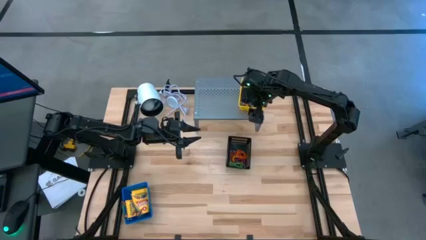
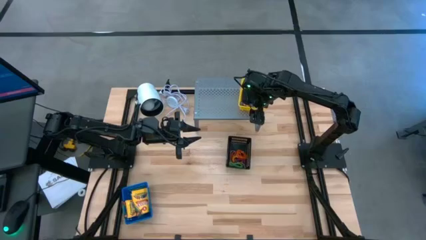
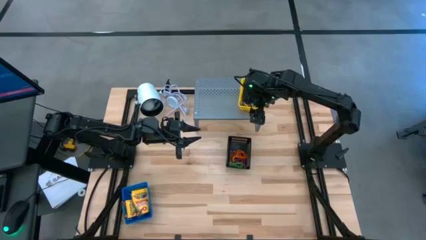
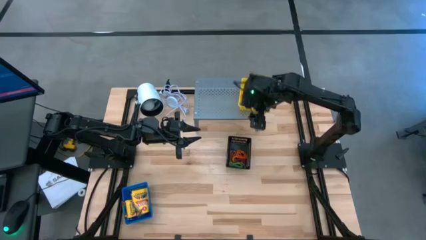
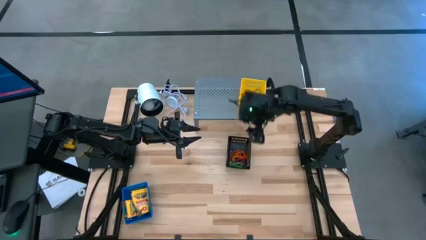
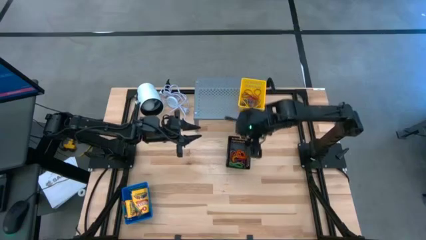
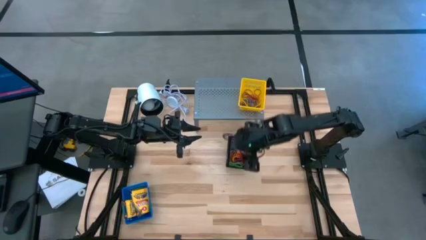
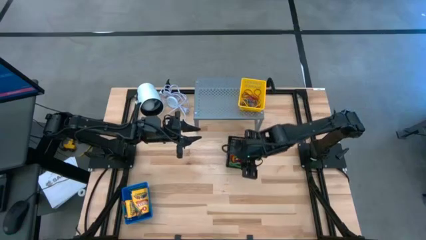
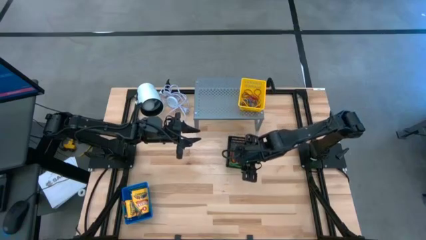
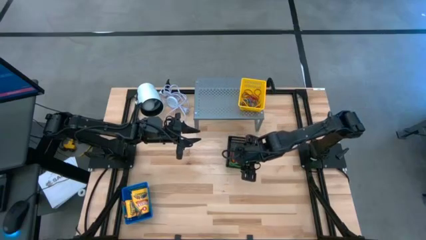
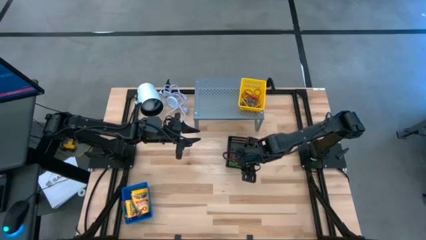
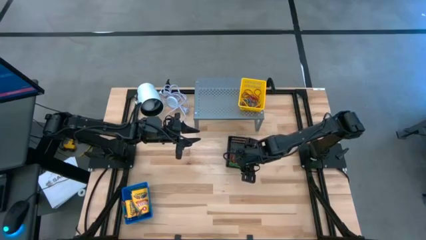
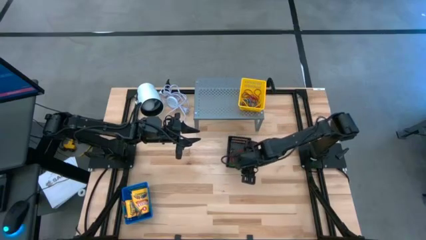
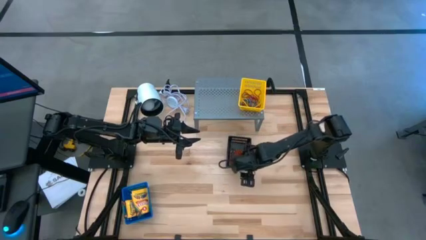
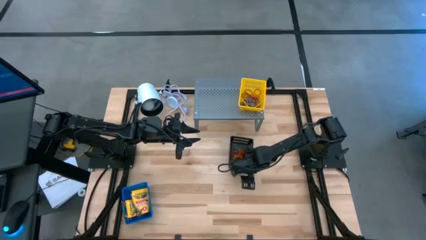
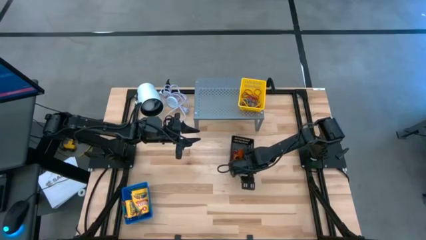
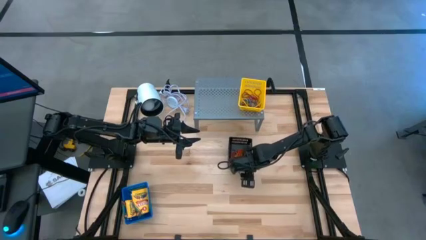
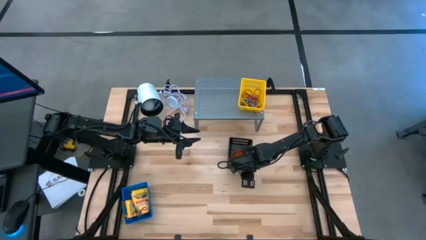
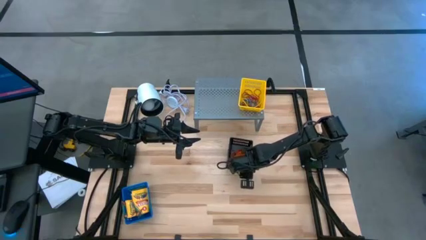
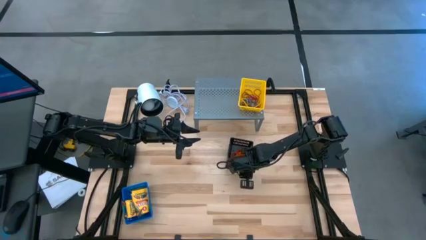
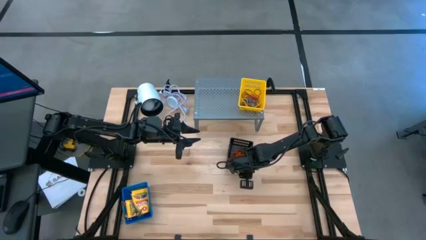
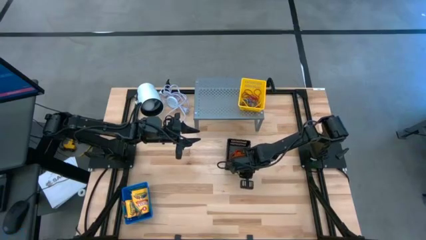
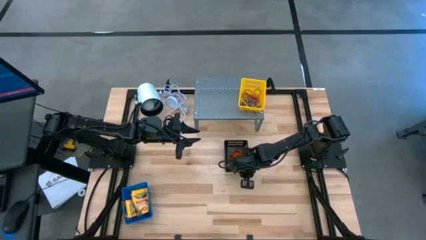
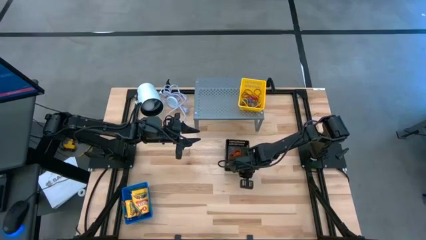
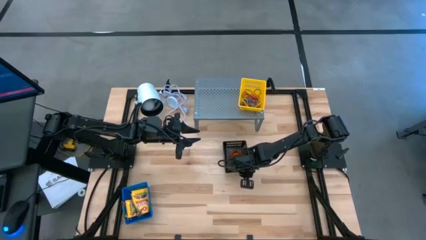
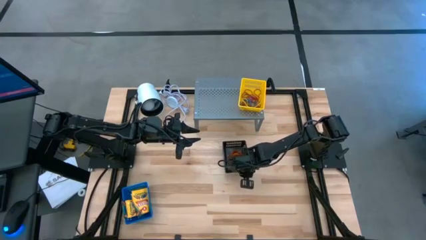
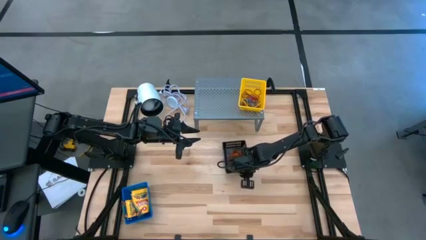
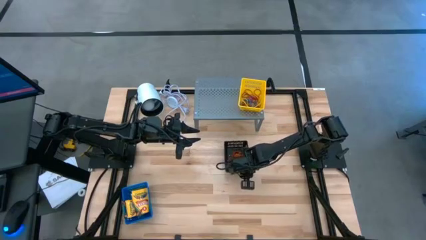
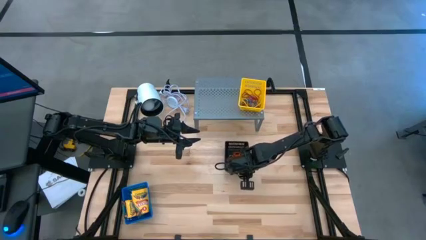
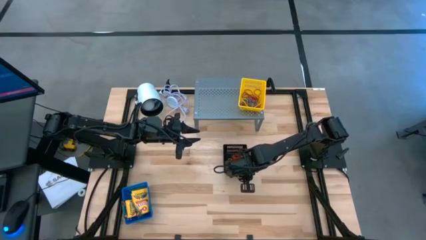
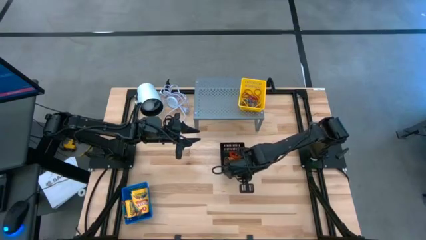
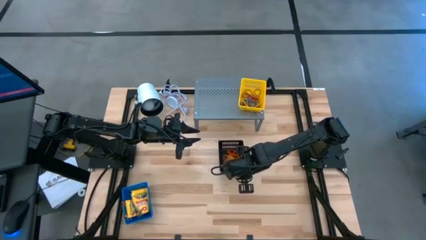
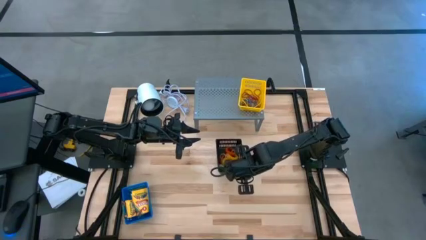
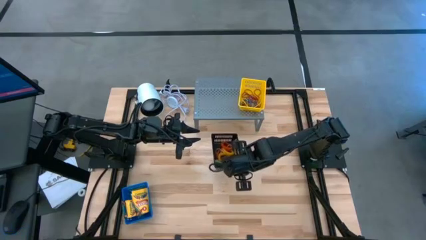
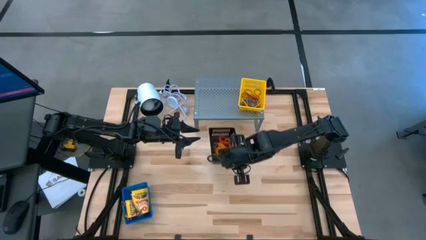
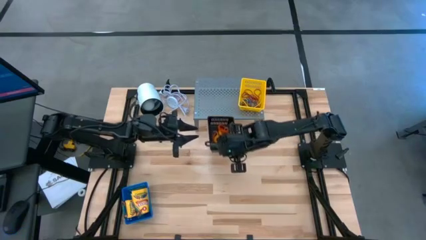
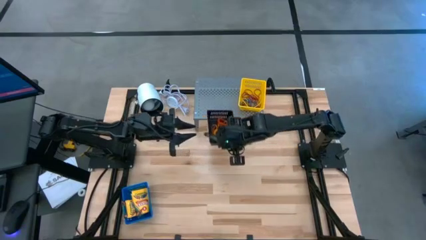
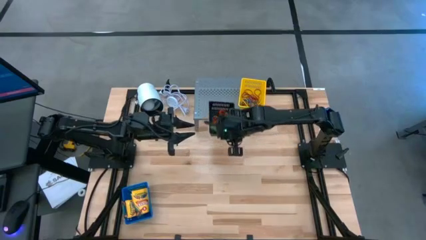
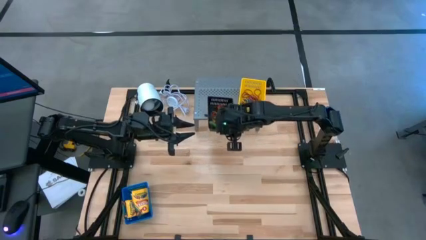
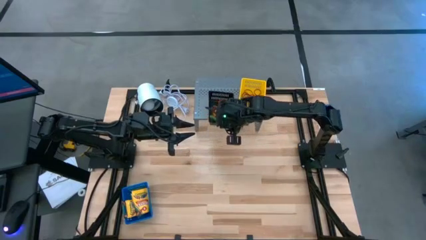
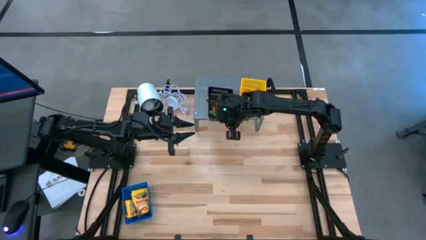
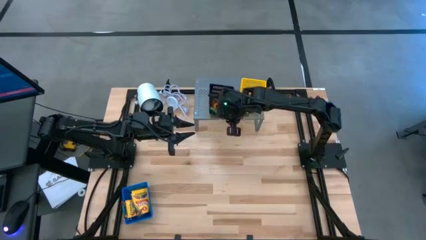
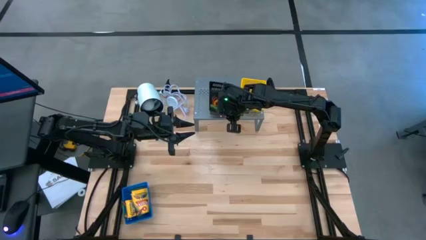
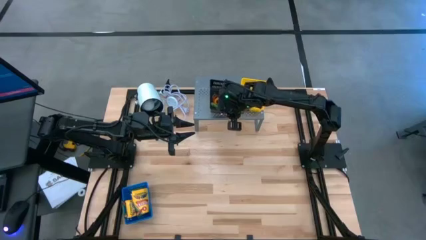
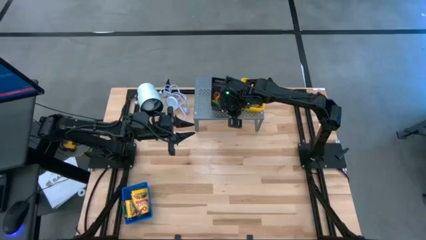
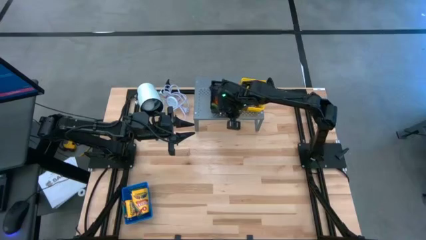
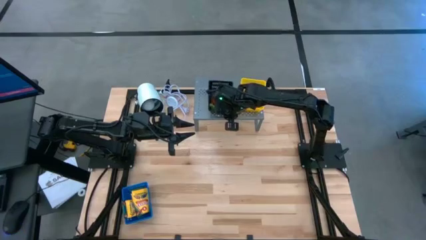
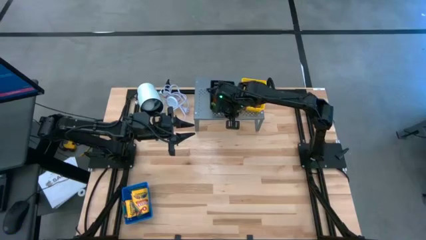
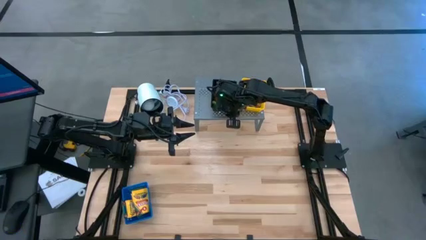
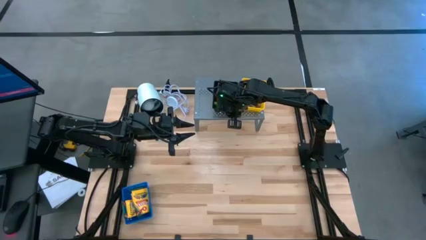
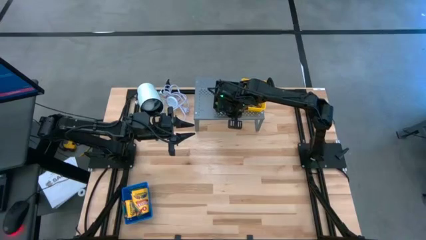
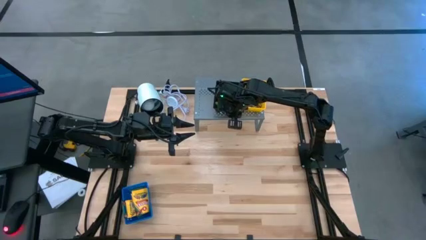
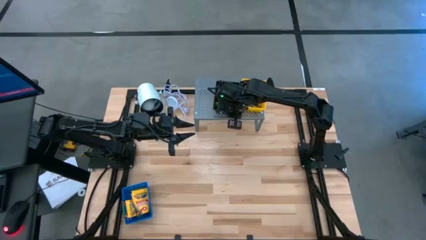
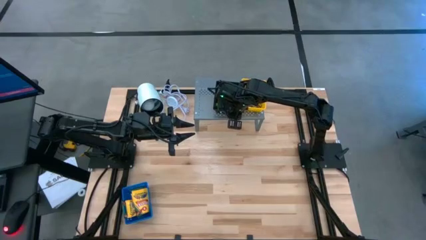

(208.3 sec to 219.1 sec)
Task: Pick & Place Office Desk Supplies
Put the black basket filled with spring rubber band on the shelf

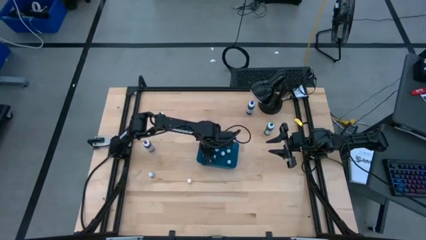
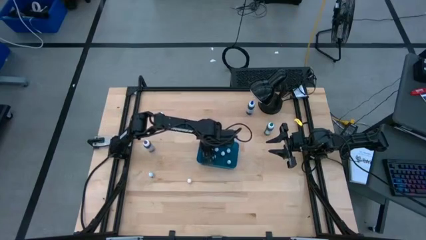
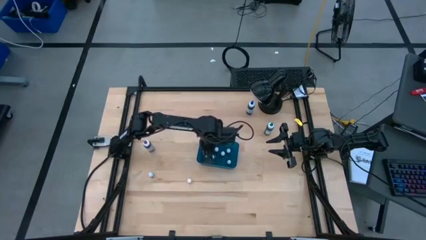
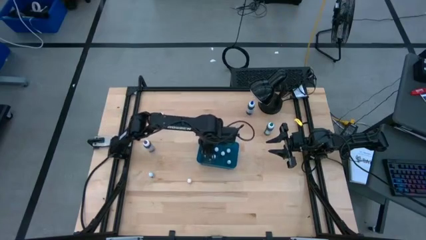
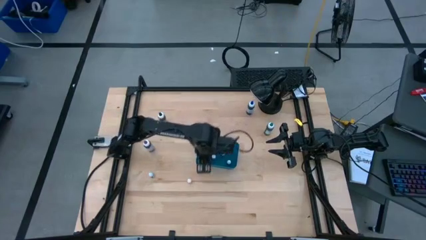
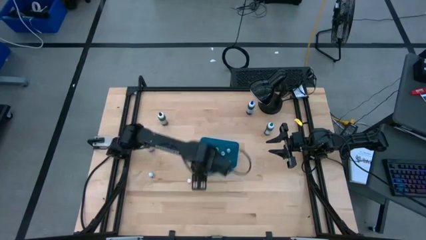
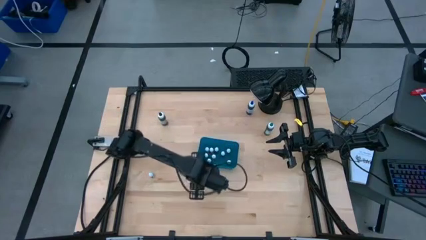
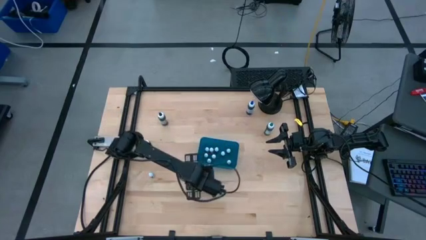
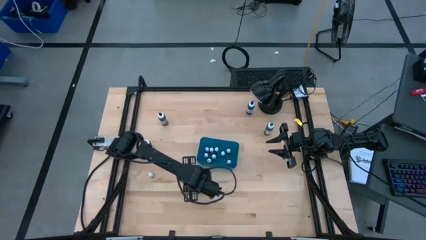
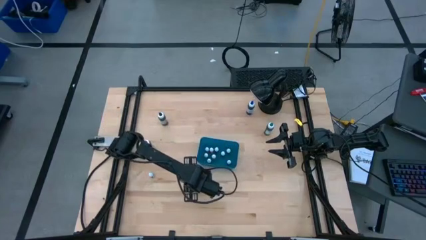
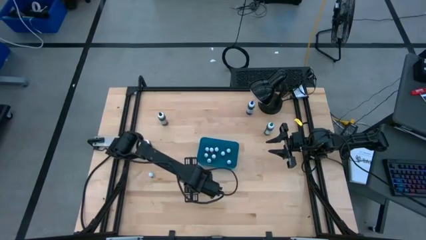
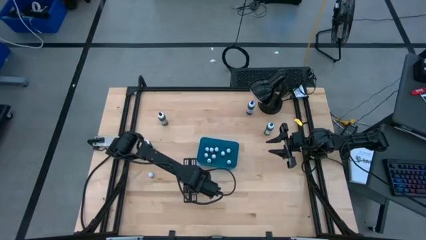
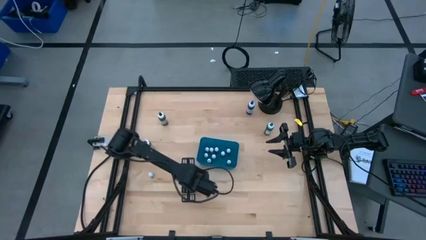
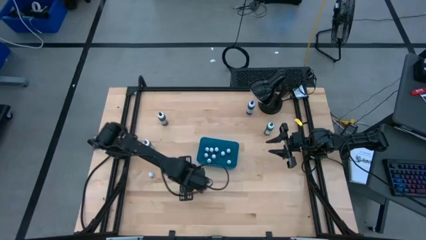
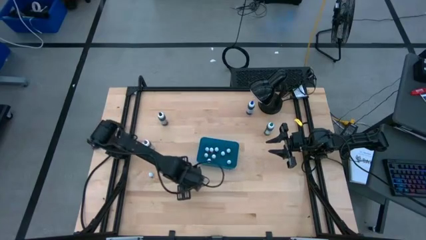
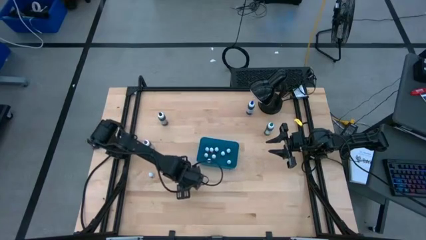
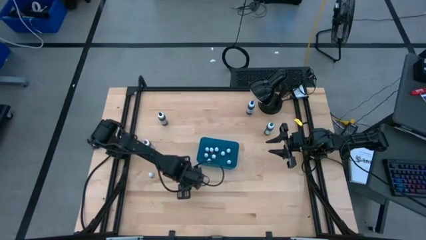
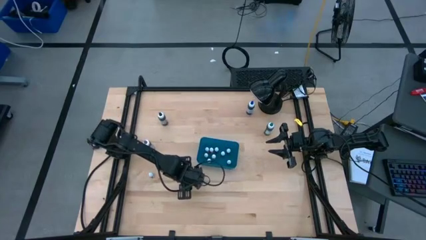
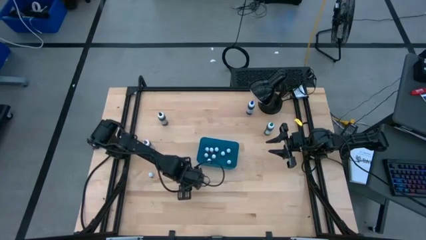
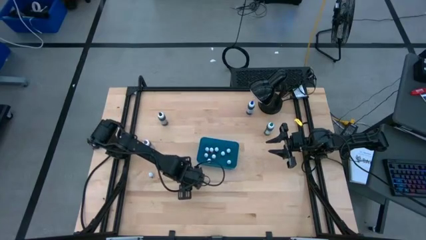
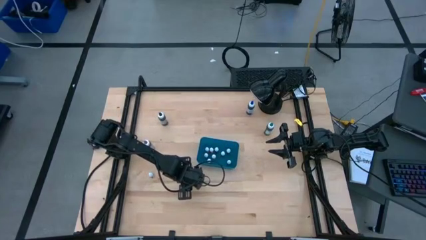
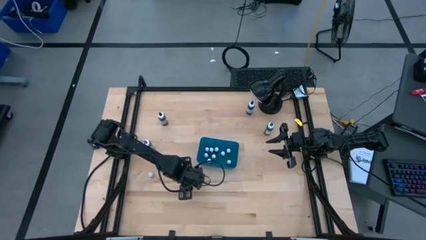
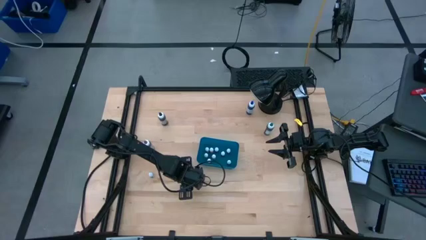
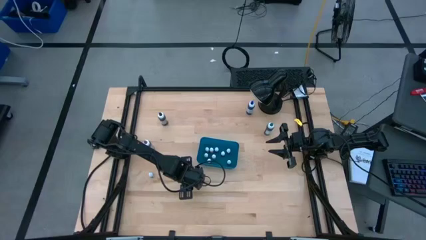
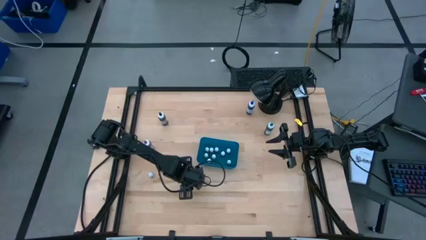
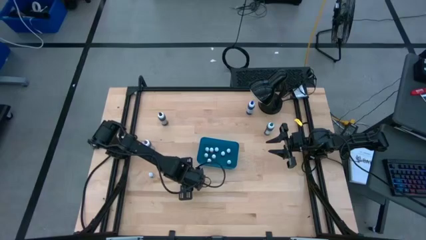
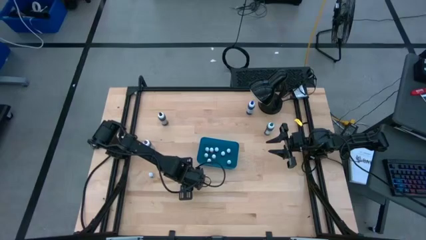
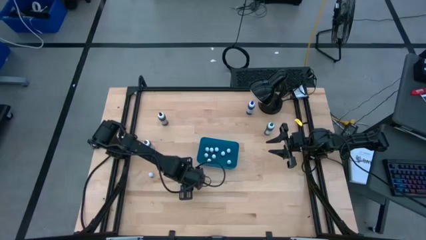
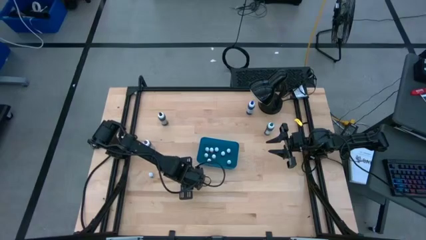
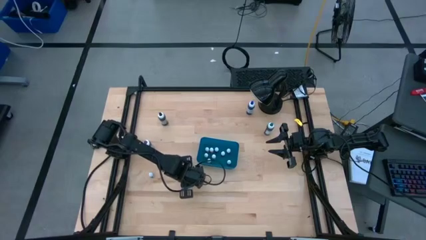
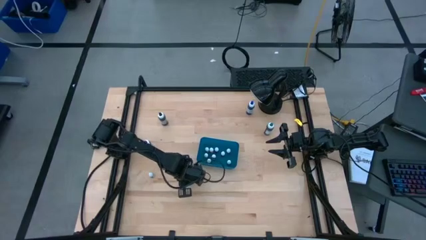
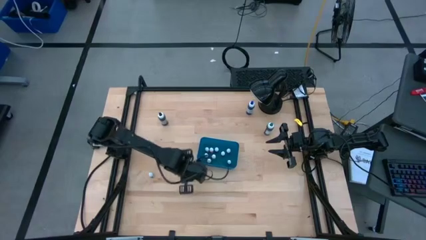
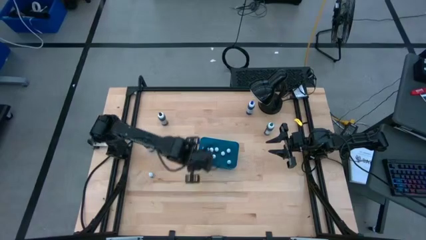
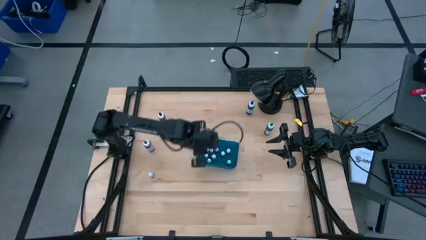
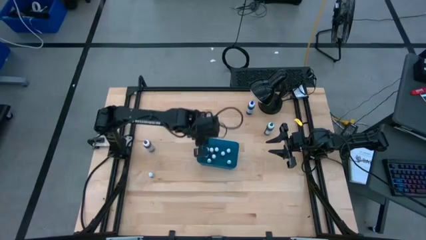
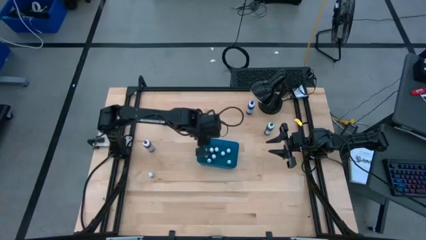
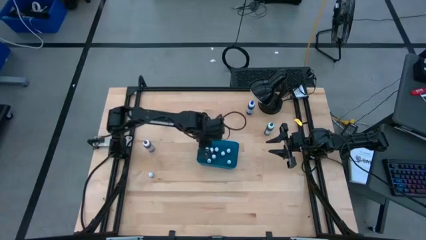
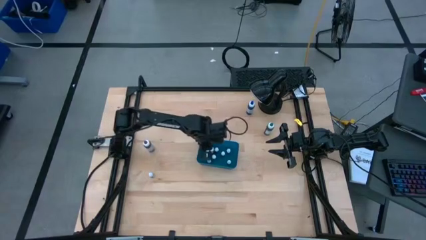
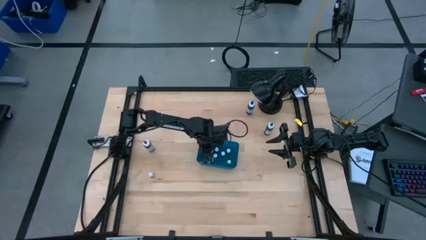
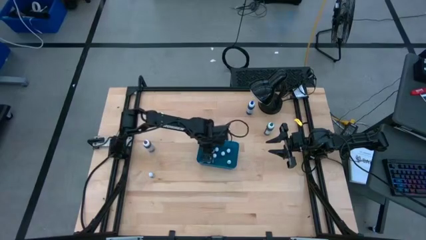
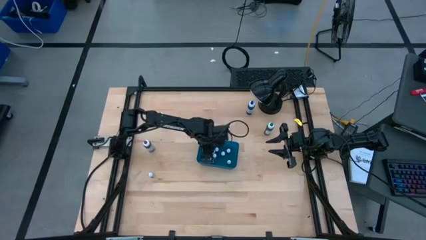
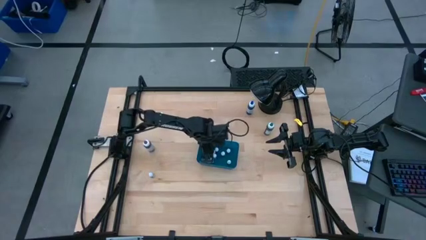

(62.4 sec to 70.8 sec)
Task: Pick & Place food coloring
Put the small orange food coloring bottle into the blue bin
